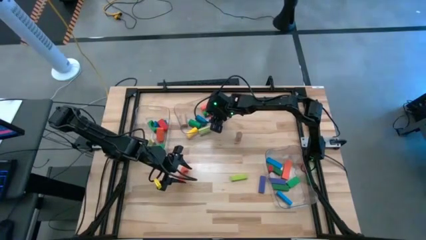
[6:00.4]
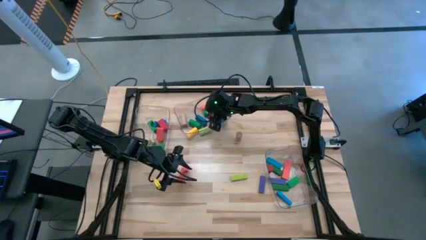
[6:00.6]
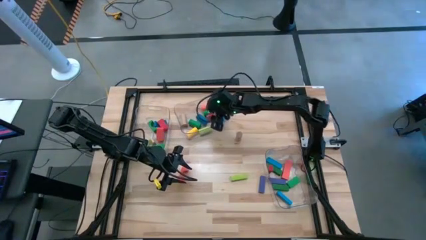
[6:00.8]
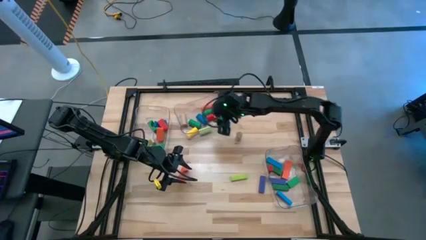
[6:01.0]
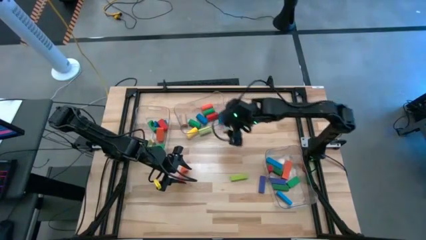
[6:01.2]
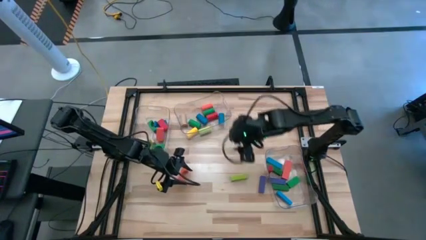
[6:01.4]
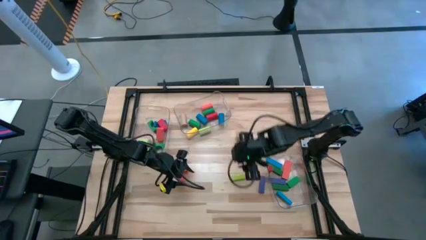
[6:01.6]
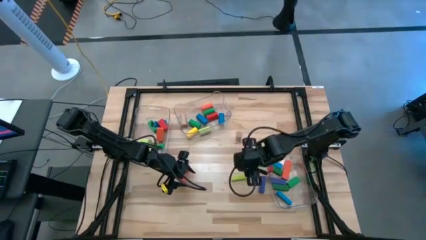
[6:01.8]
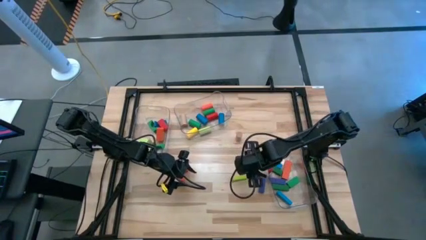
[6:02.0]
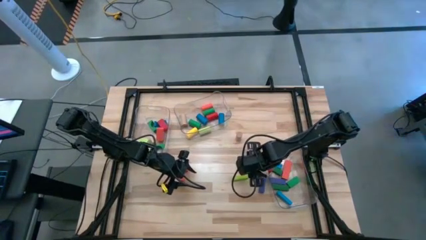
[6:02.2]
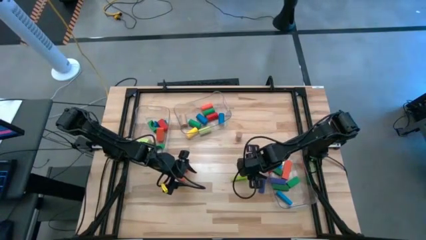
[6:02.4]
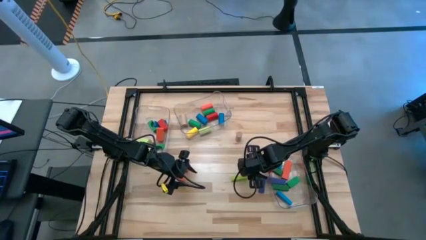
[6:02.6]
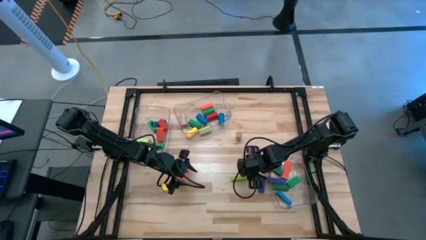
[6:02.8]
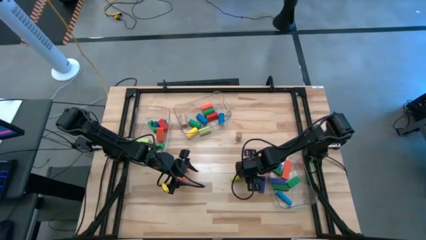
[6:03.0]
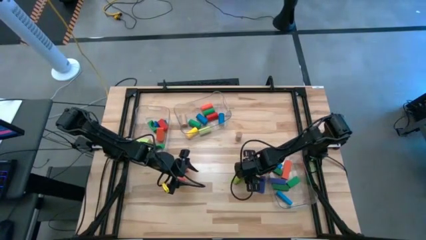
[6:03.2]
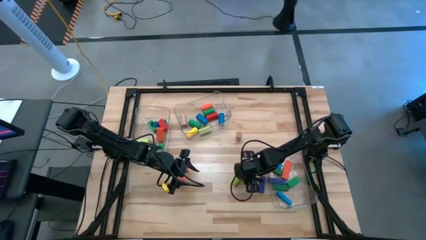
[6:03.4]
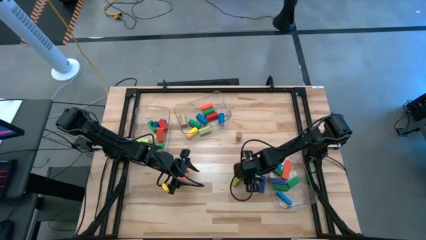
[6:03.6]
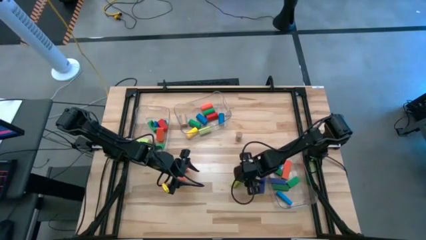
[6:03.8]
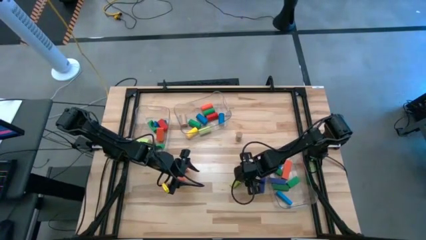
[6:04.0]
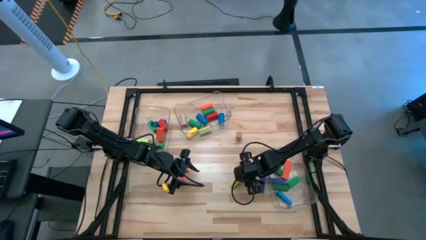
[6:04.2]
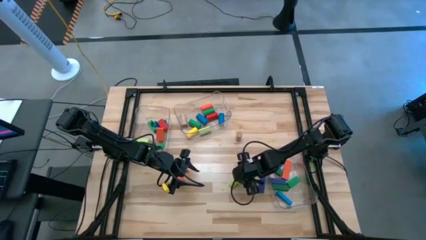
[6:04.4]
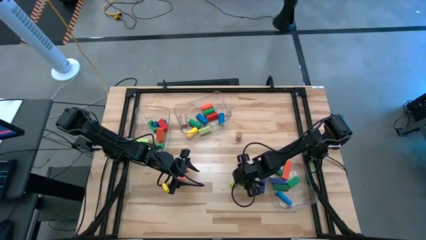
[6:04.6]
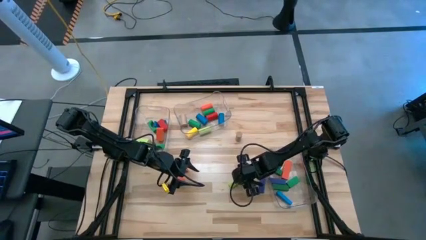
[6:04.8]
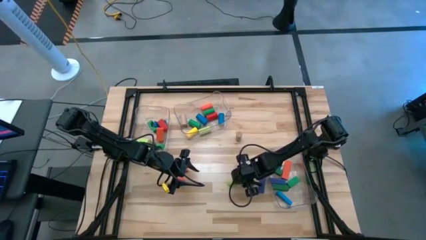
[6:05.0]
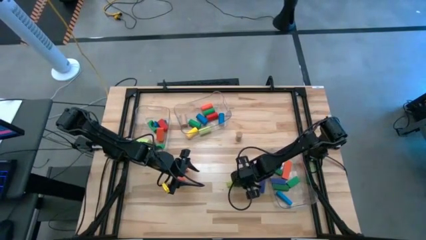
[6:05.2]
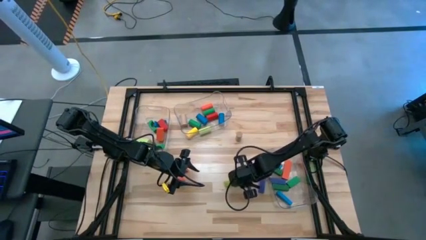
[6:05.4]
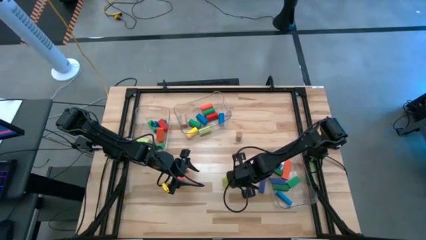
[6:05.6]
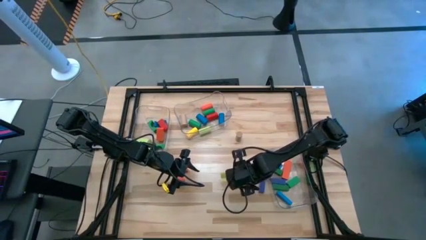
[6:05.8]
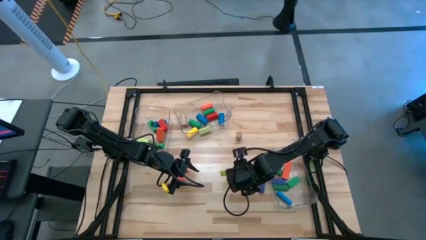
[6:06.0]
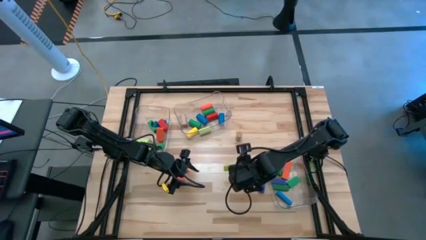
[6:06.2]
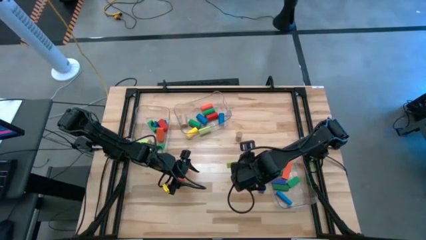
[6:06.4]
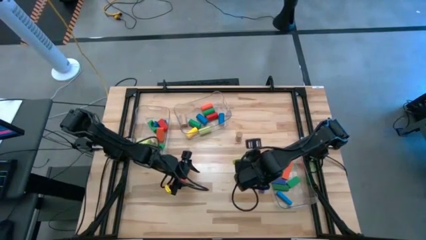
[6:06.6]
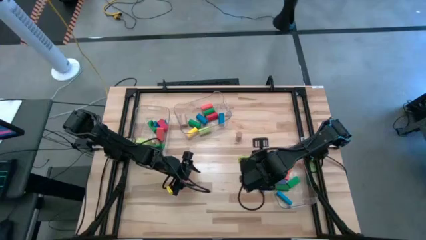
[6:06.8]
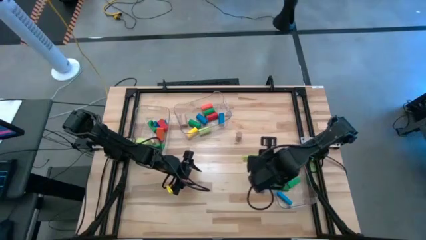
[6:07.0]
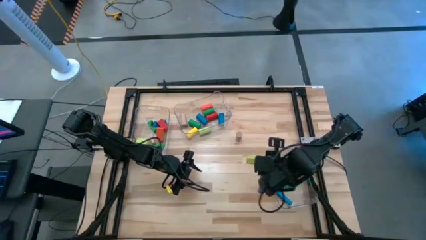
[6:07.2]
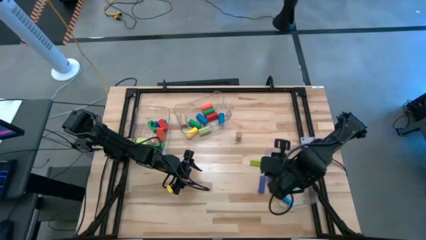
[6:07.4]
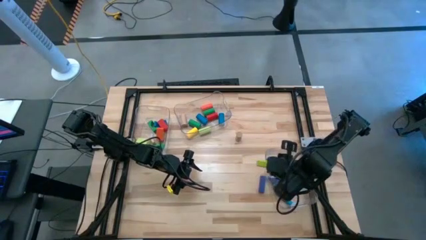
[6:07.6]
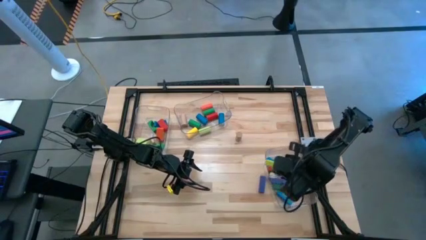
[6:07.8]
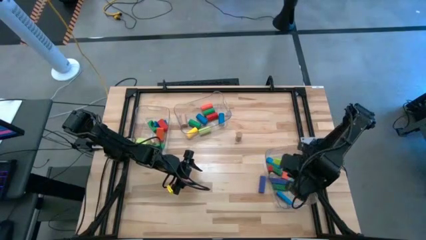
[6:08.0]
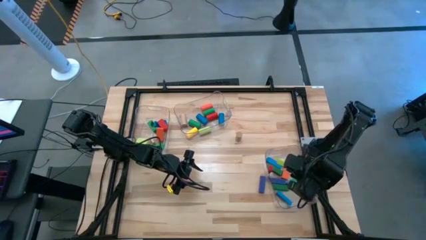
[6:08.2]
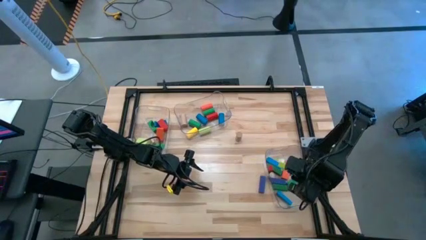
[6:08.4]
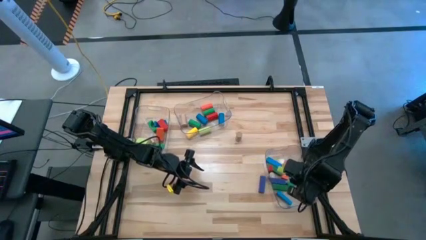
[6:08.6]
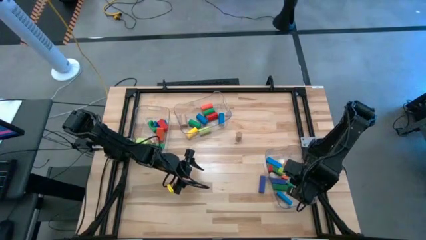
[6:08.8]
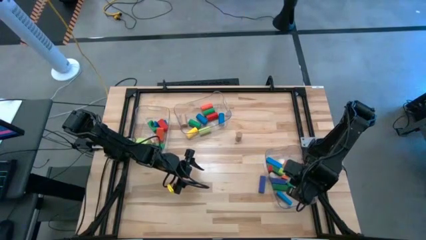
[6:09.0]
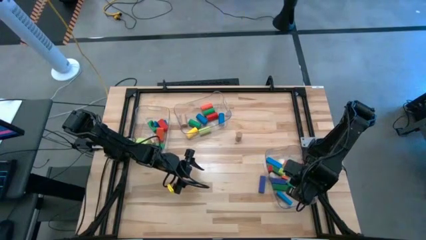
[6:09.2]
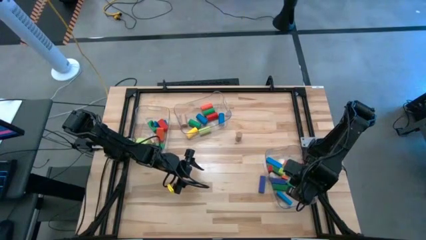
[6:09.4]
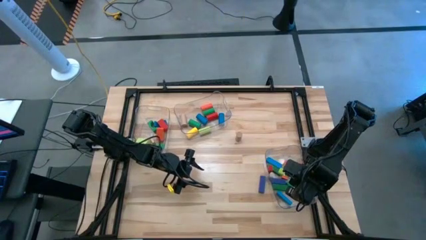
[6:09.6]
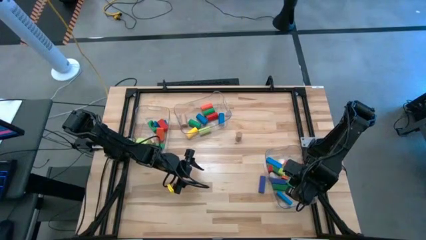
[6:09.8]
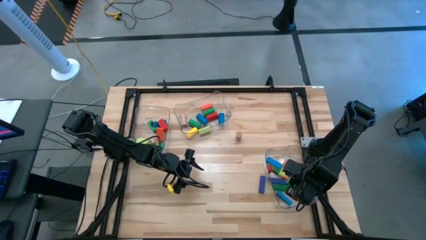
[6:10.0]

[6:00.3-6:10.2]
Task: Sort blocks by size
Put the light green rectangular block into the right transparent bin

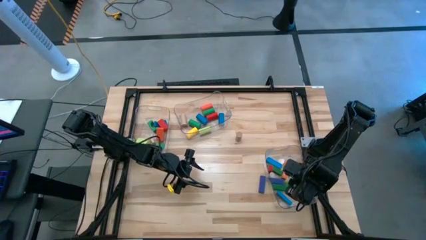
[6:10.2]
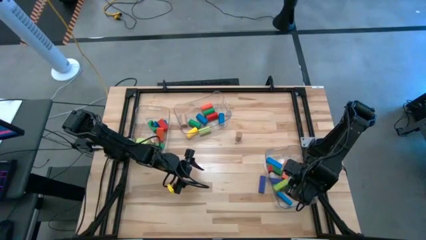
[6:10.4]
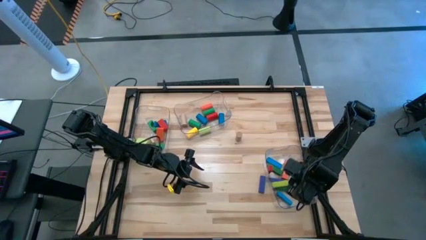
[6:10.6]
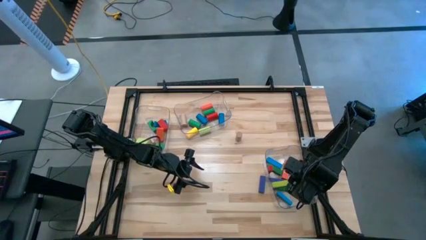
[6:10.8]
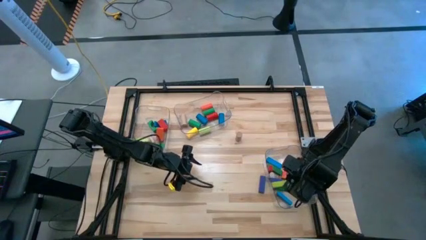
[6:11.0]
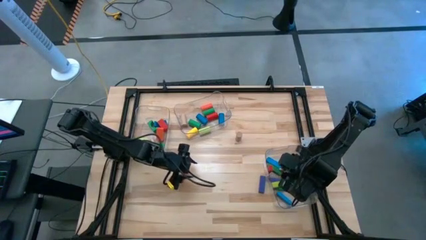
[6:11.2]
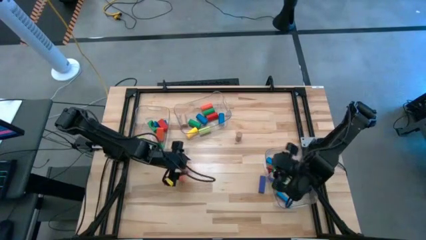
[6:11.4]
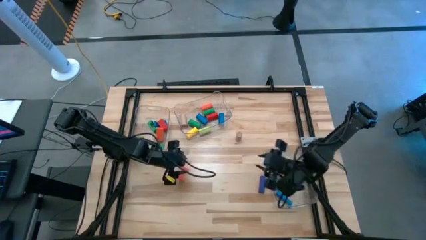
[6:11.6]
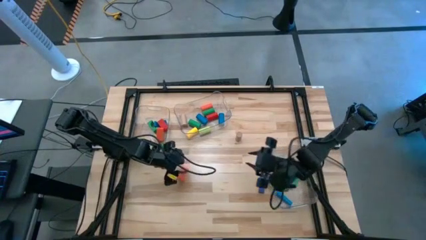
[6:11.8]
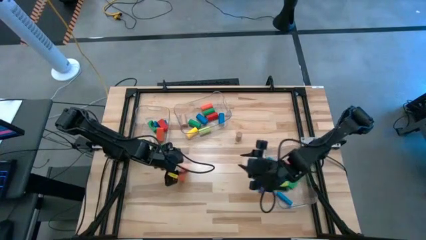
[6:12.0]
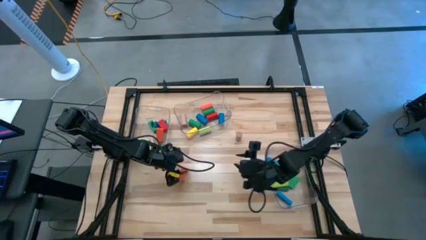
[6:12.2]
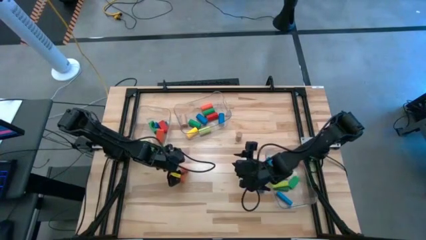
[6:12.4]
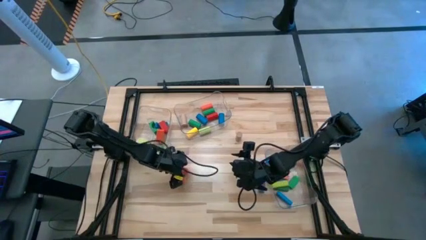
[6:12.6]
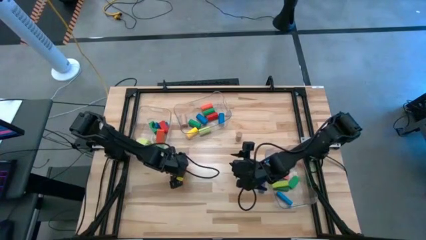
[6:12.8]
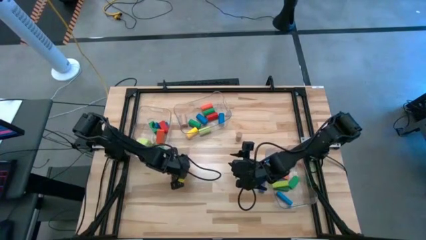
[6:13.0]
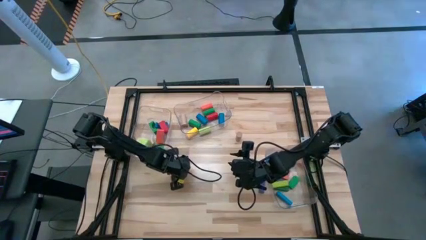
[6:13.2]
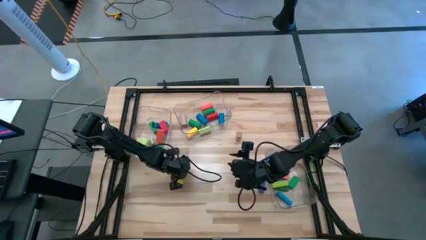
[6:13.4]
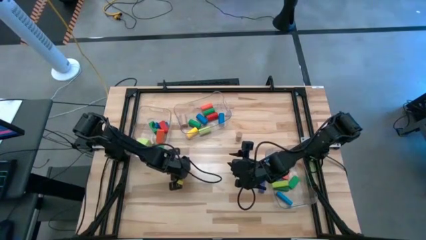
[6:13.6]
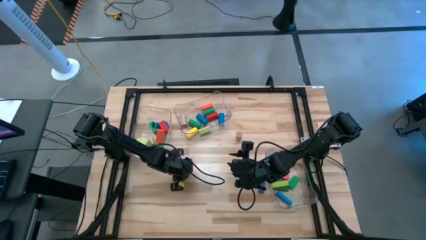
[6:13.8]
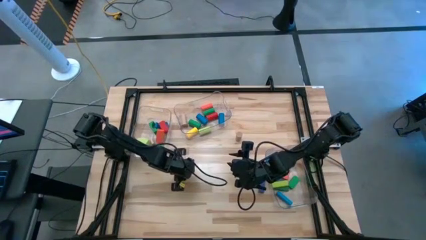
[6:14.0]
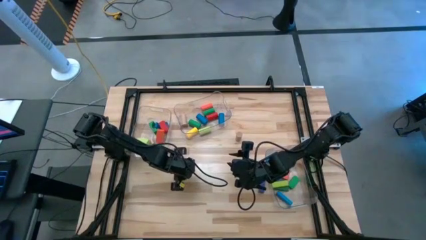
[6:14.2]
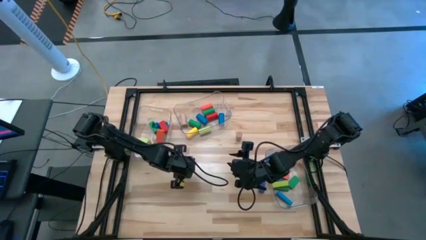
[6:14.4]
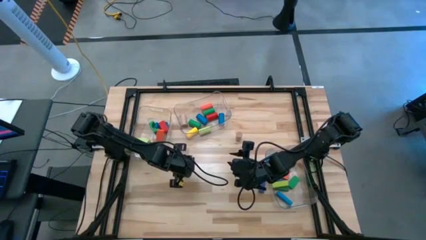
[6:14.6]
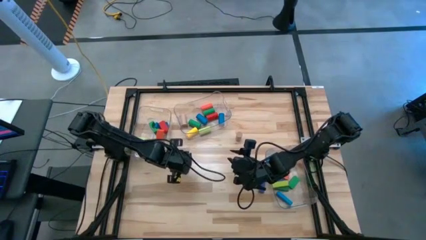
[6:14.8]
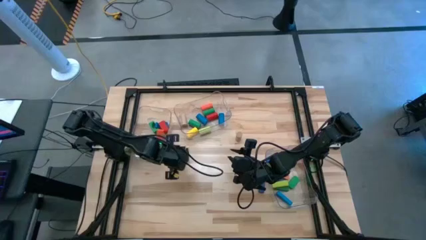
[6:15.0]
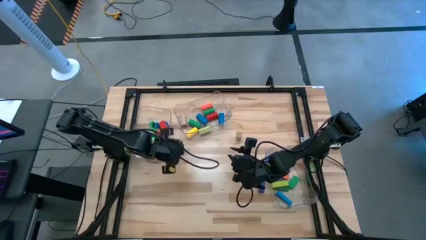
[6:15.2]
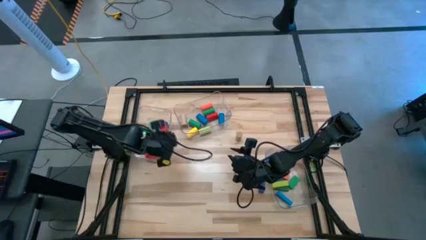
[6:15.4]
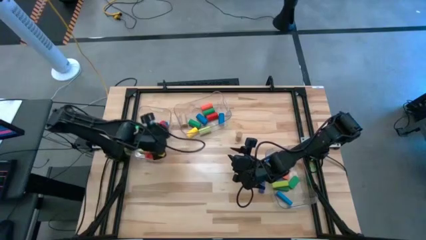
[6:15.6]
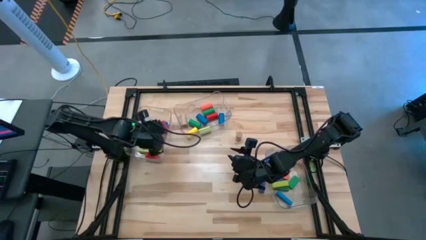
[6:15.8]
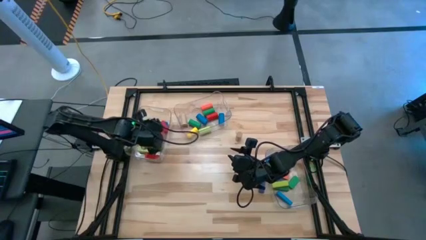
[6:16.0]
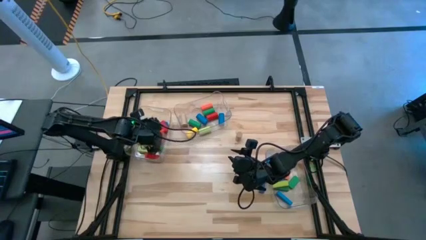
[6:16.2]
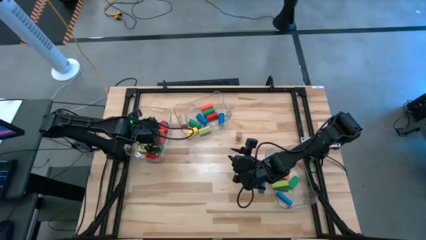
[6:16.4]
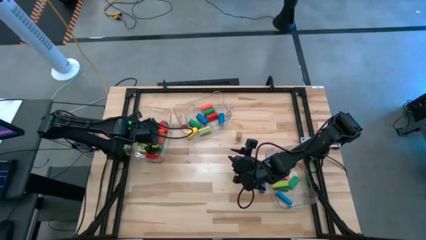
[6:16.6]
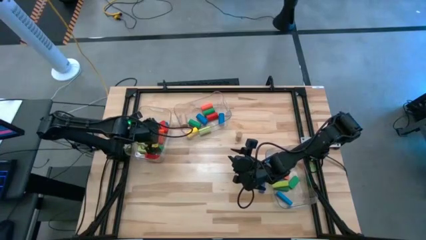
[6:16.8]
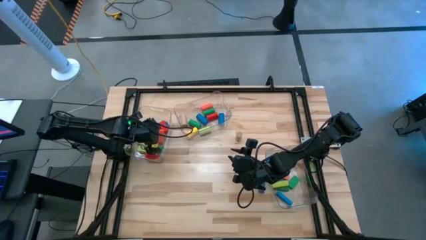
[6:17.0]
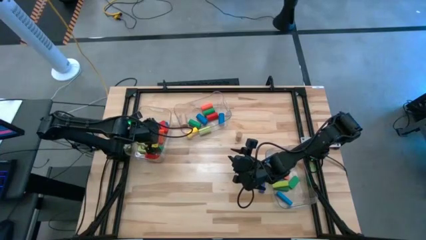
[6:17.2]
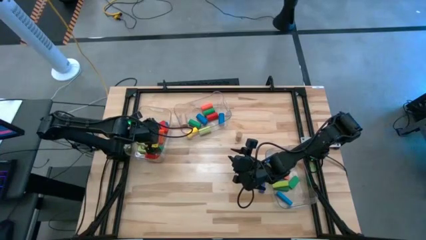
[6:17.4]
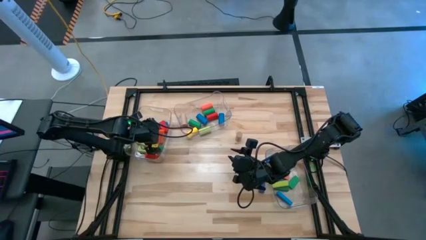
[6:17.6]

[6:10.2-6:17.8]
Put the orange arch block into the left transparent bin
